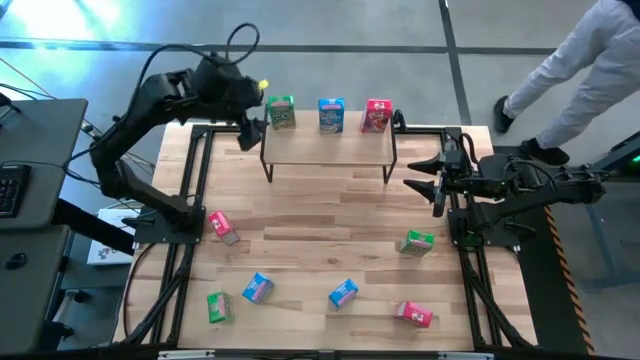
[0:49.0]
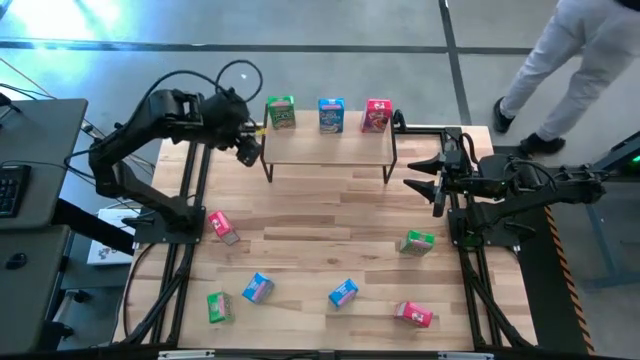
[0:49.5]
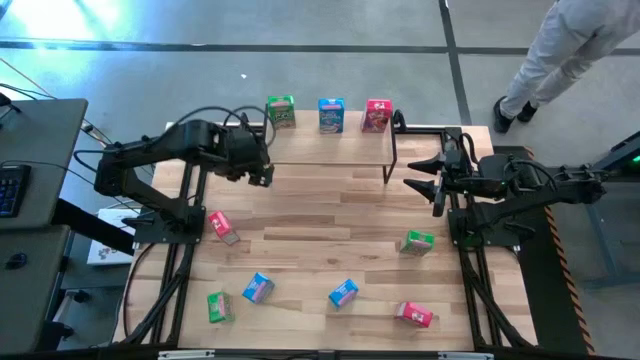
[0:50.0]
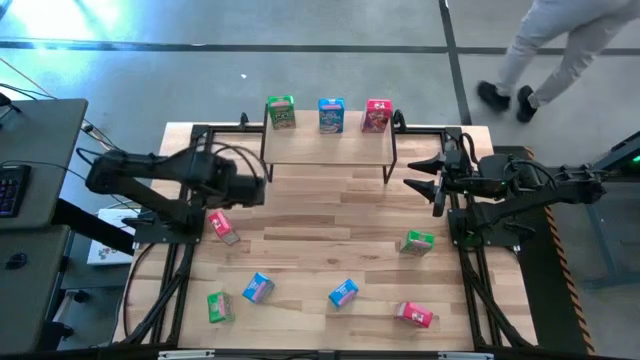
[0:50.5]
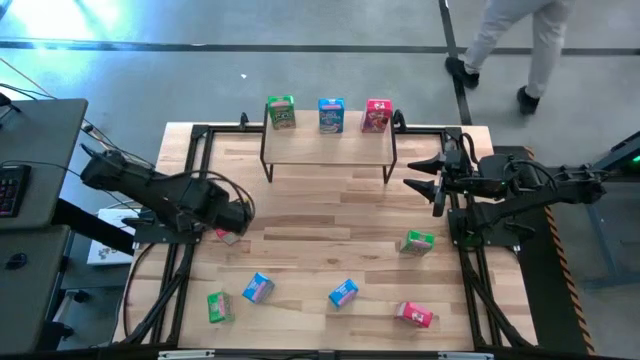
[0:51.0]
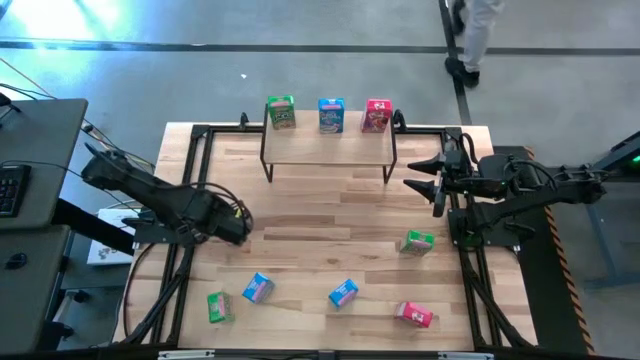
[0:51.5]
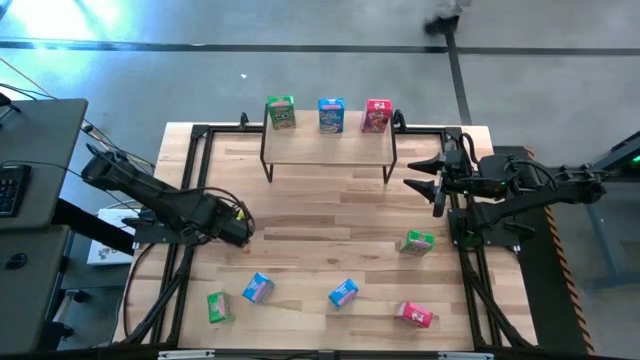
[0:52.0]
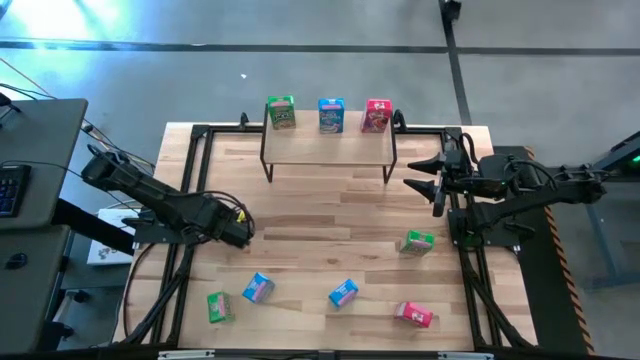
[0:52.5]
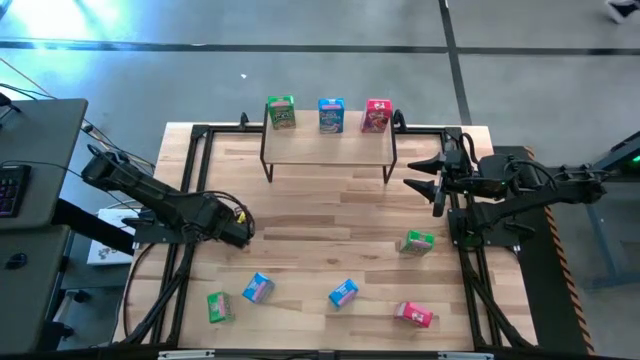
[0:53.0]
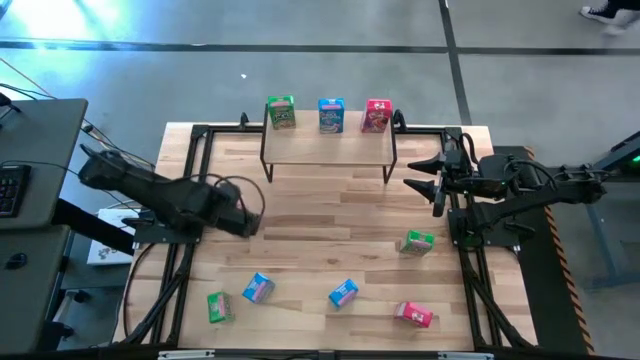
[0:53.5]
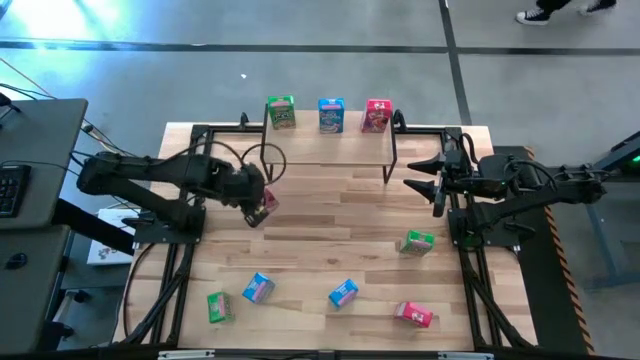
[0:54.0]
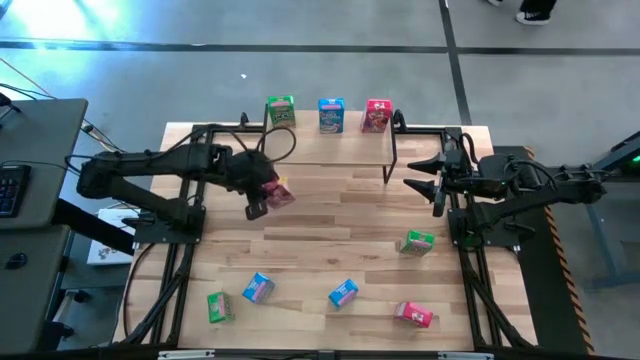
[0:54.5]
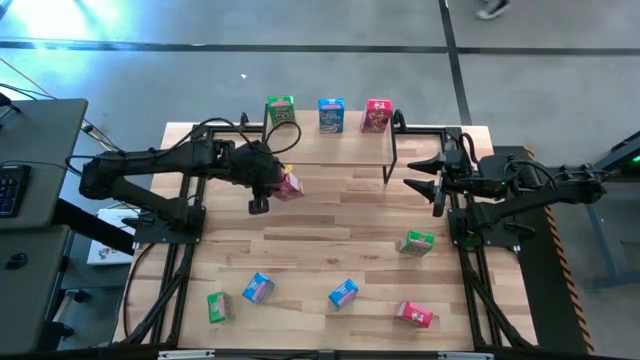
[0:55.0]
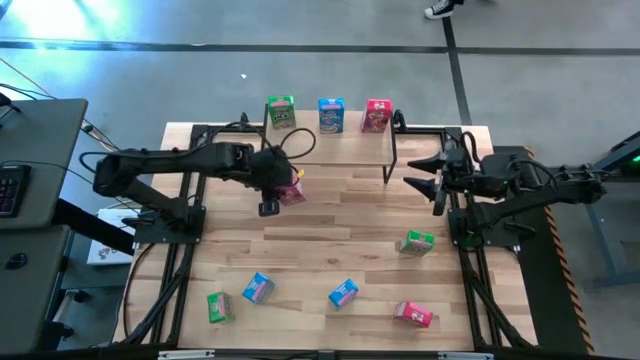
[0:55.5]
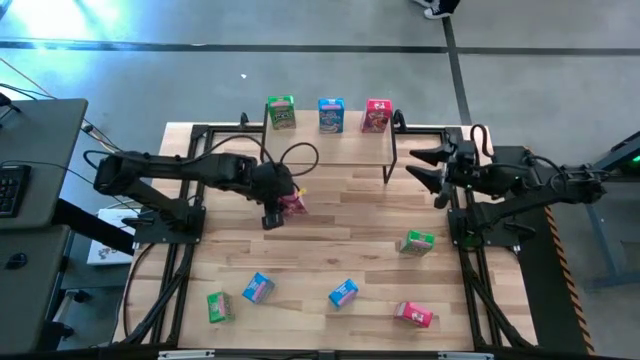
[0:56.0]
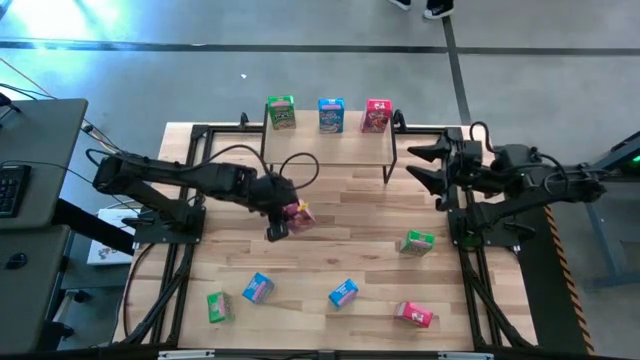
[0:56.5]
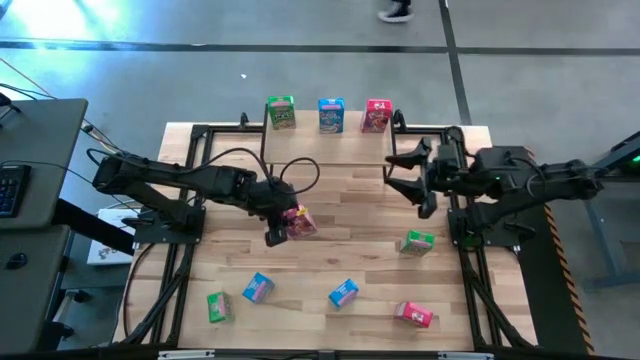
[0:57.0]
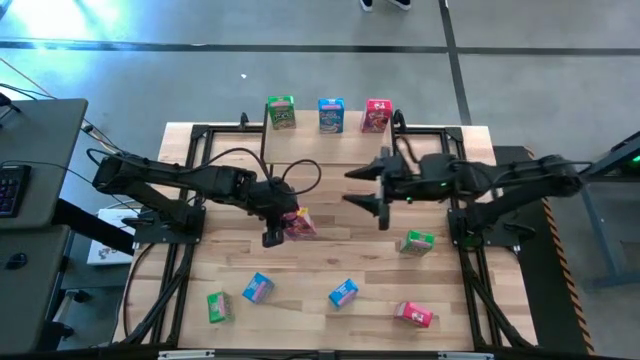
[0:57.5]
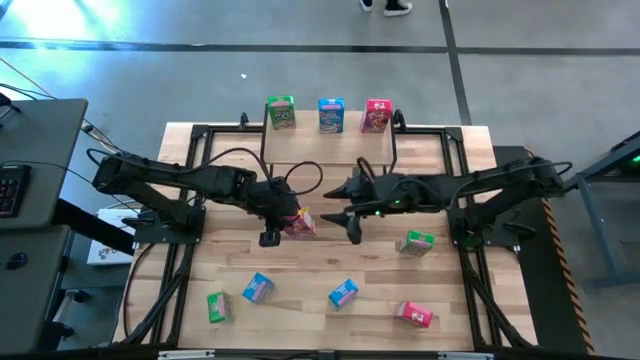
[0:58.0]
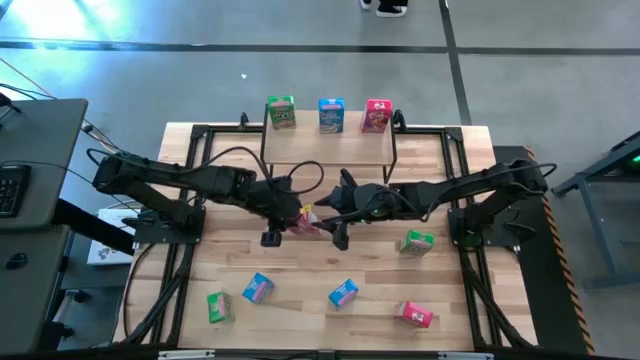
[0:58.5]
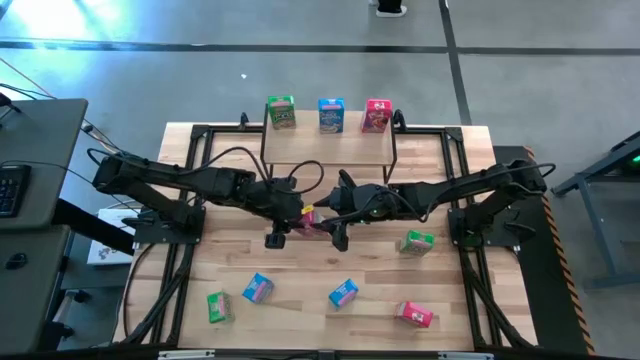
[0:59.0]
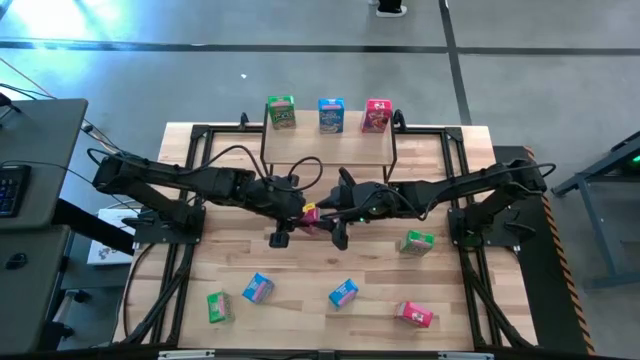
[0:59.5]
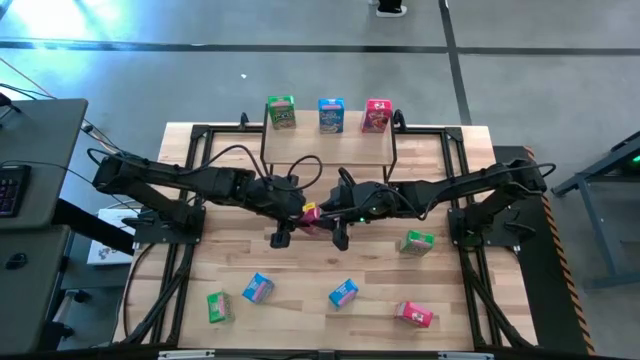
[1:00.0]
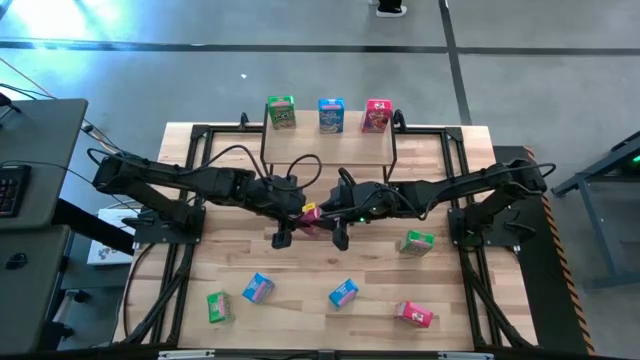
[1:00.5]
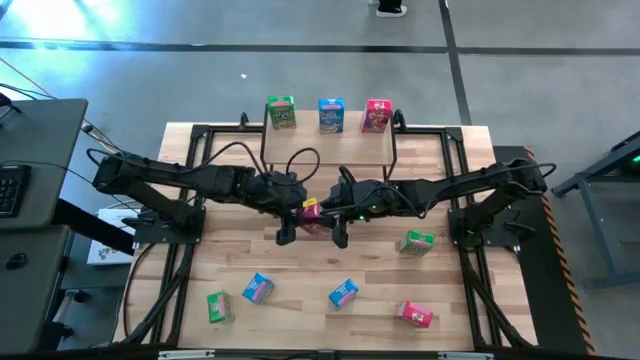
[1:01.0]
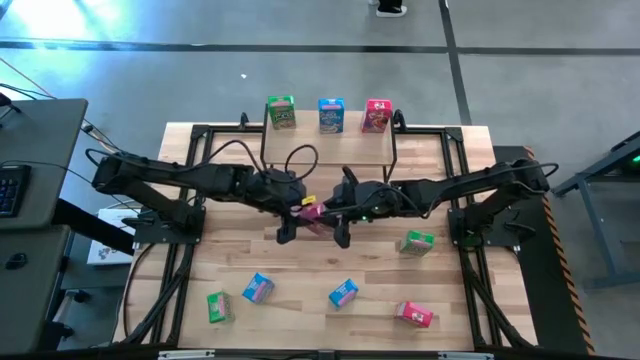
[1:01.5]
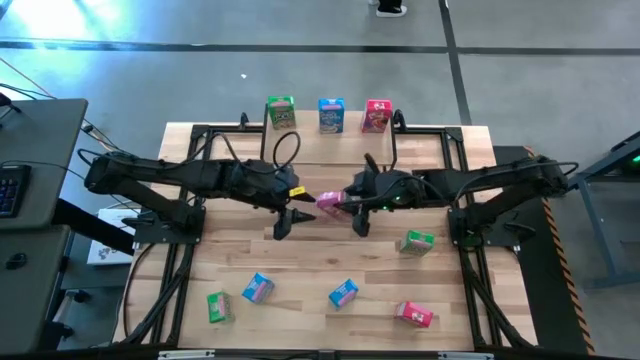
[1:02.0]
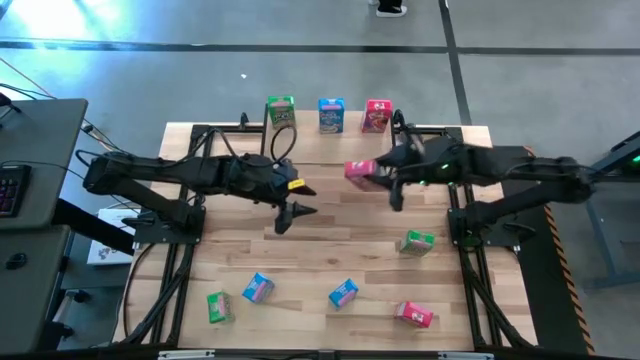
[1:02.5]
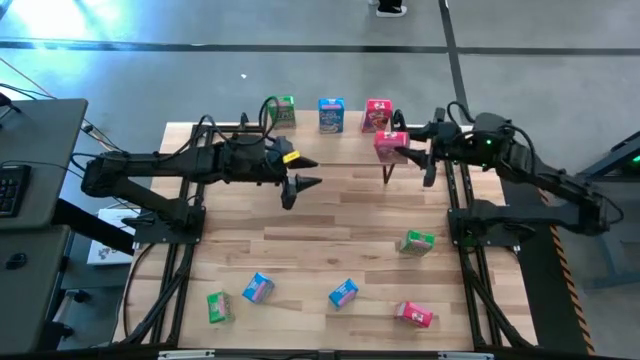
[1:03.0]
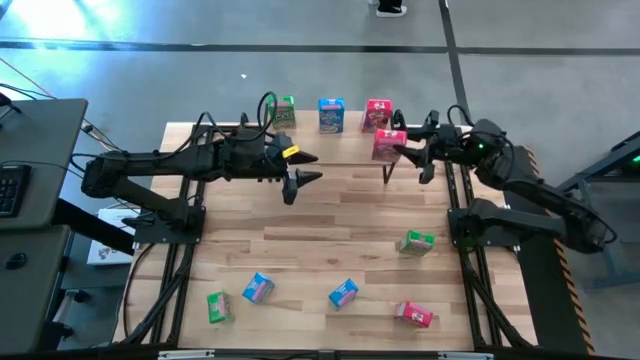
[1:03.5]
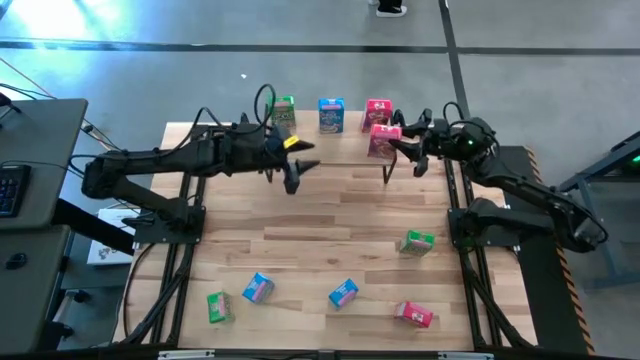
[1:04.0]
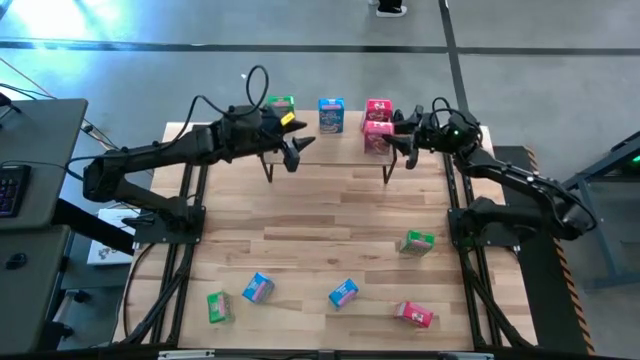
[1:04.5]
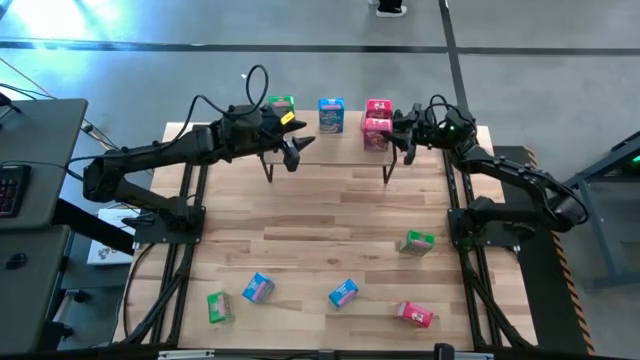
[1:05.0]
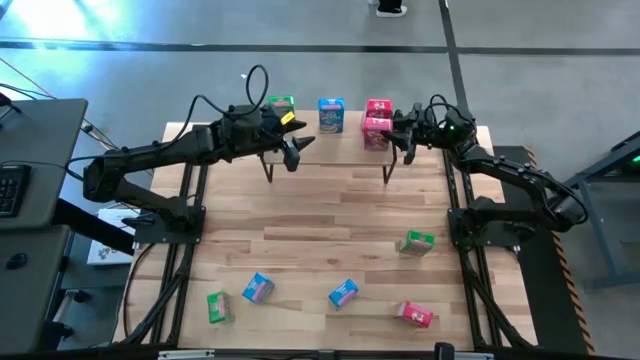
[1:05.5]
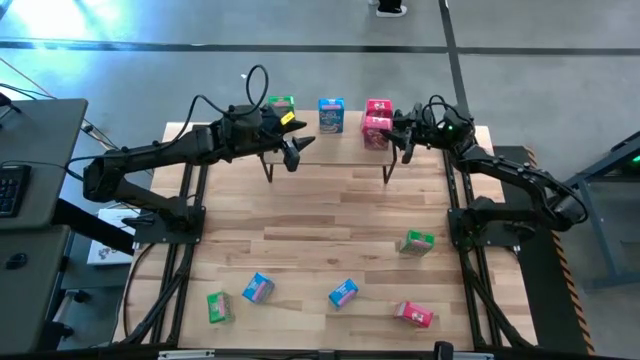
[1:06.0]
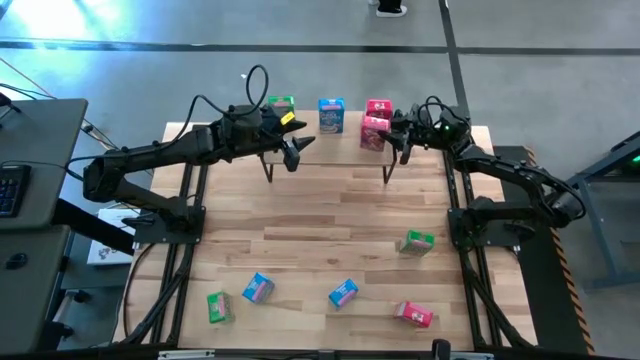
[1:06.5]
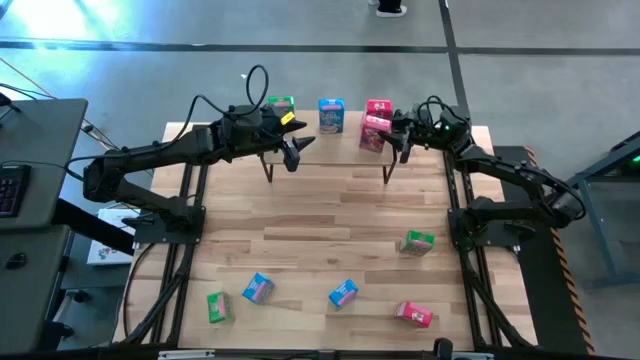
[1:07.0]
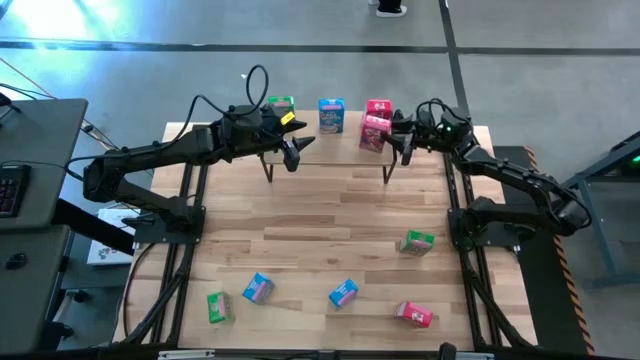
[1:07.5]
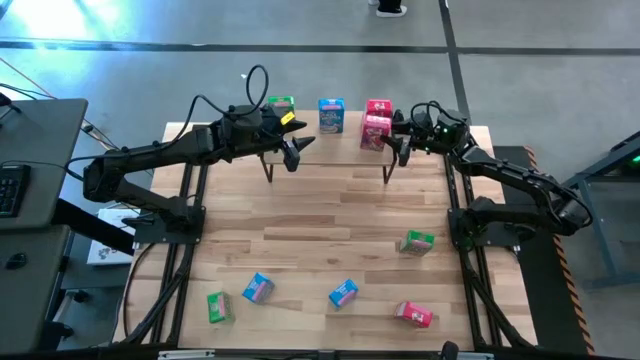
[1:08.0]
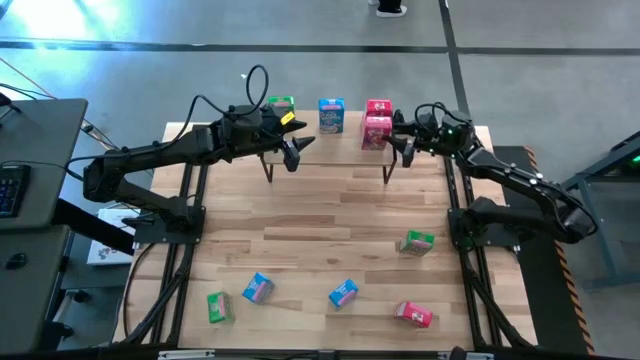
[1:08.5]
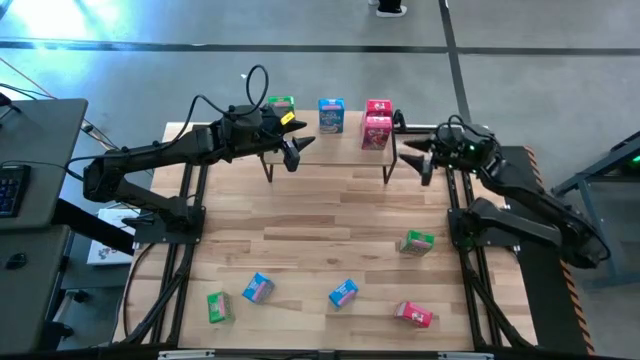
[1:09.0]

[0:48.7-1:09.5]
Task: Stack cereal on shelf
Put the left red cereal box on the shelf

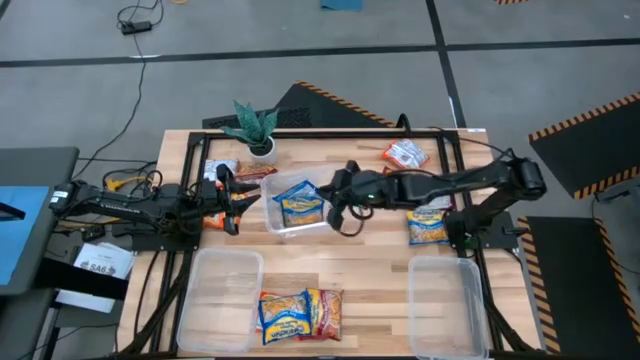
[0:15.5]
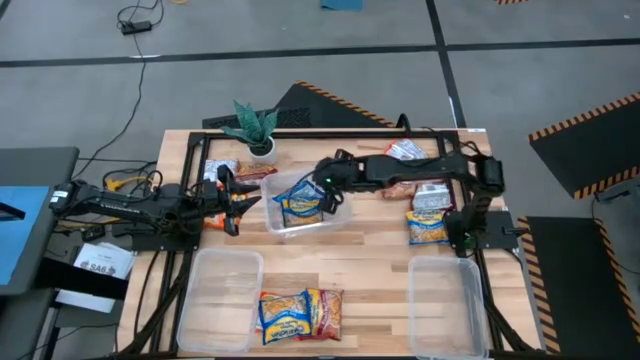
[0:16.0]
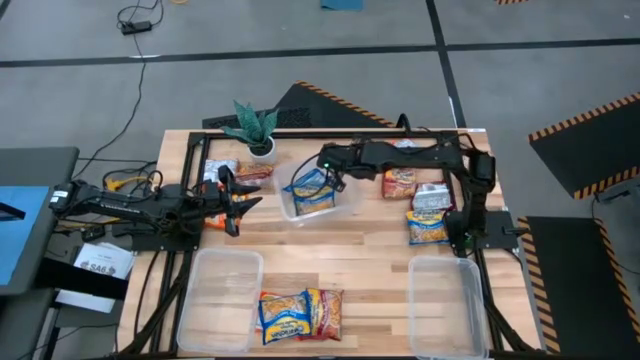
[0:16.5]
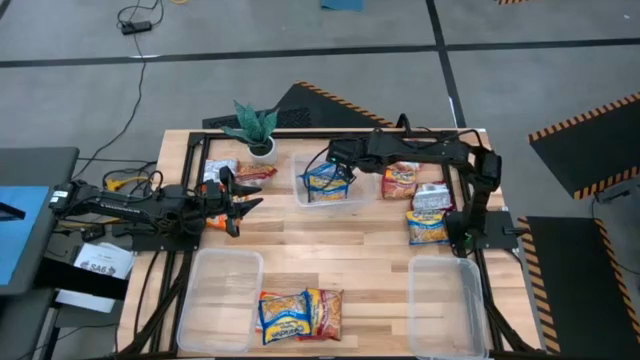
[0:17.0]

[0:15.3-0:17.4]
Task: Sort Maruchan noodles
Adjust the top transparent bin
